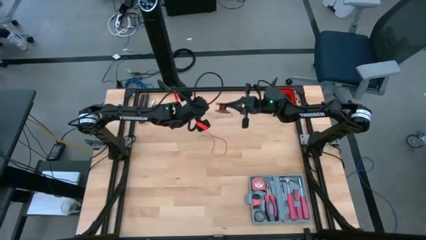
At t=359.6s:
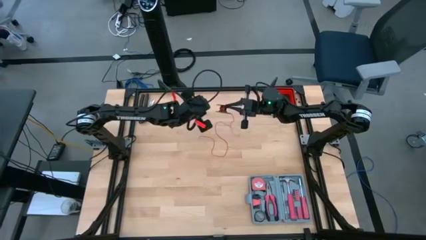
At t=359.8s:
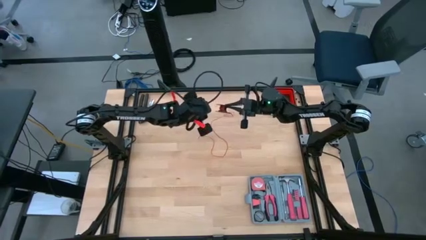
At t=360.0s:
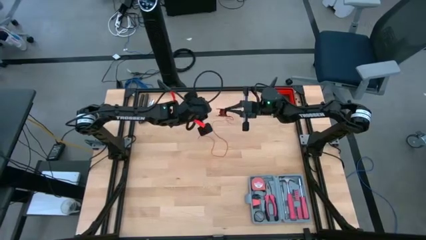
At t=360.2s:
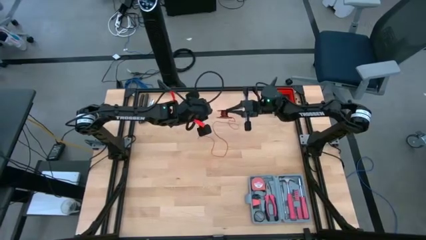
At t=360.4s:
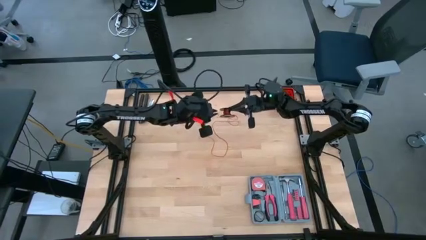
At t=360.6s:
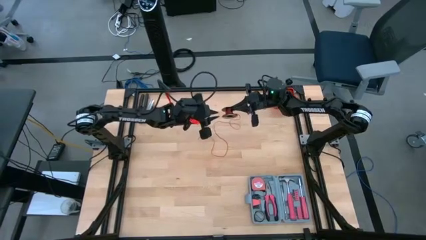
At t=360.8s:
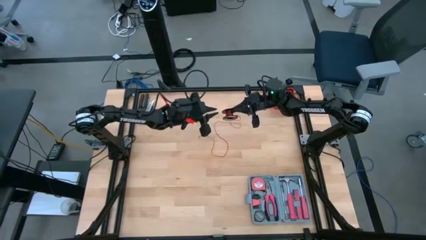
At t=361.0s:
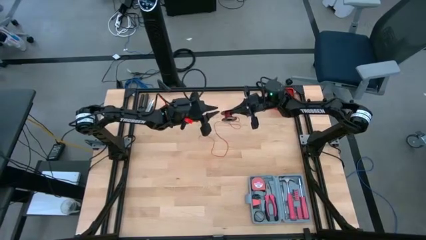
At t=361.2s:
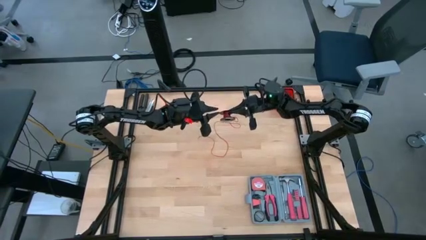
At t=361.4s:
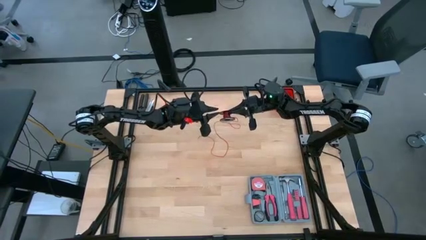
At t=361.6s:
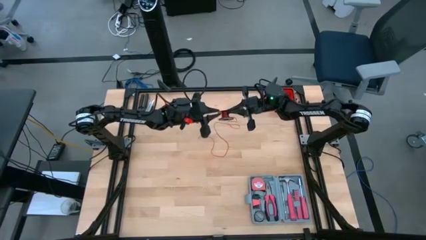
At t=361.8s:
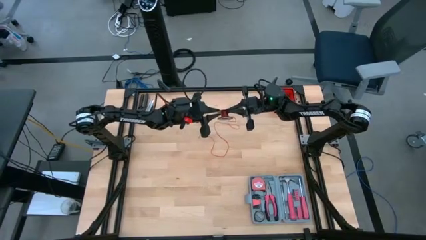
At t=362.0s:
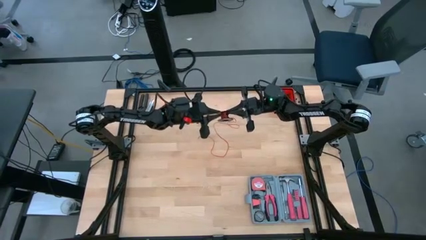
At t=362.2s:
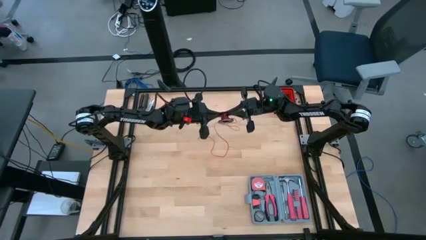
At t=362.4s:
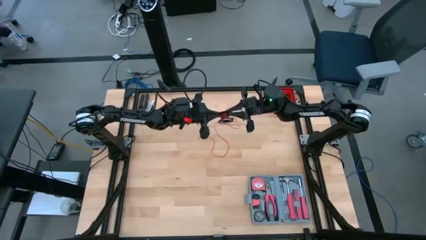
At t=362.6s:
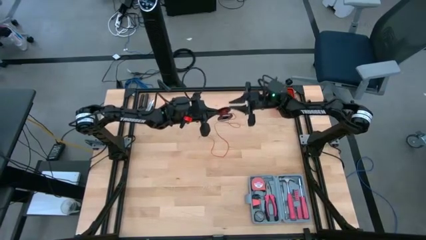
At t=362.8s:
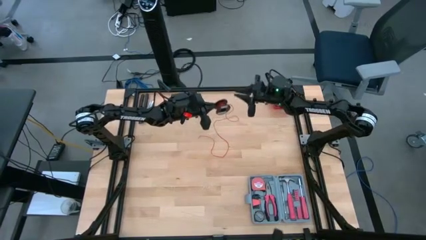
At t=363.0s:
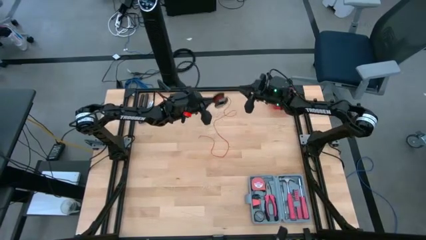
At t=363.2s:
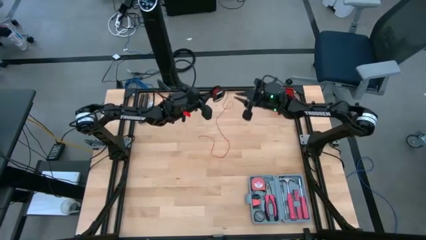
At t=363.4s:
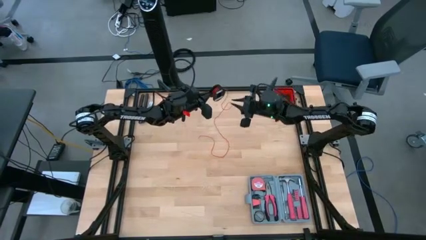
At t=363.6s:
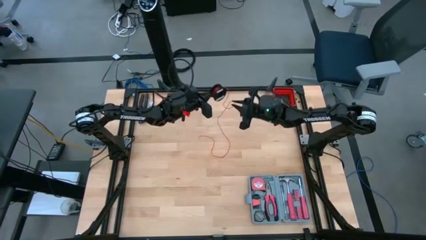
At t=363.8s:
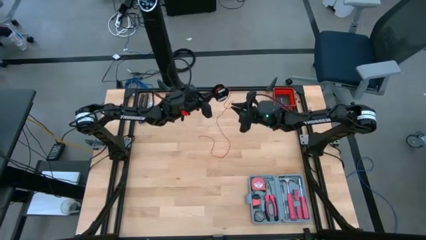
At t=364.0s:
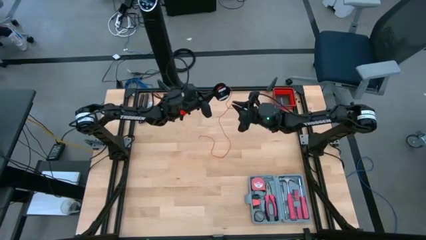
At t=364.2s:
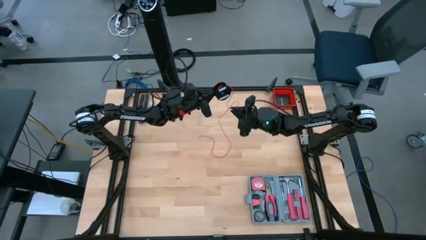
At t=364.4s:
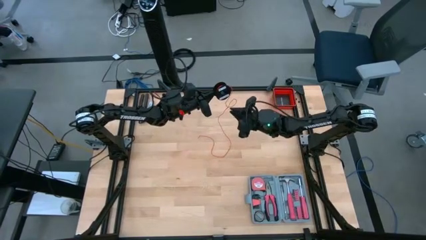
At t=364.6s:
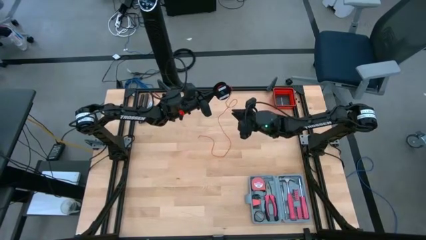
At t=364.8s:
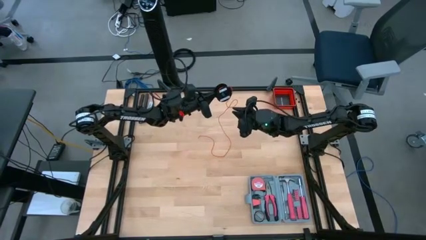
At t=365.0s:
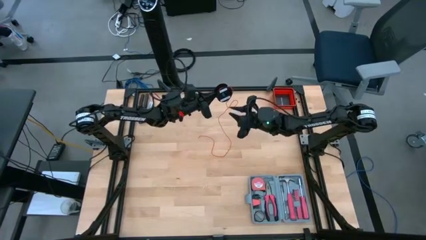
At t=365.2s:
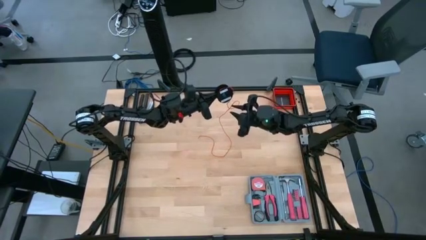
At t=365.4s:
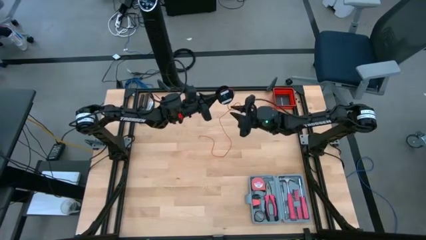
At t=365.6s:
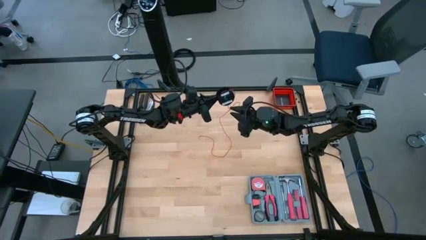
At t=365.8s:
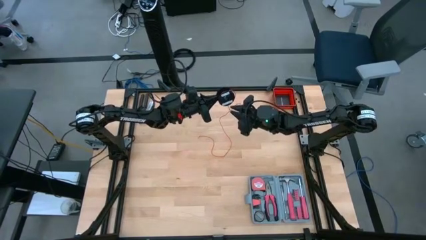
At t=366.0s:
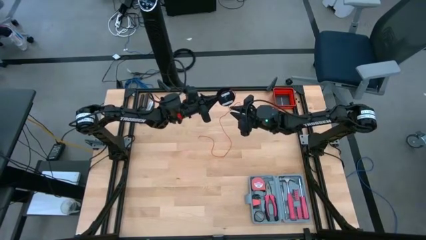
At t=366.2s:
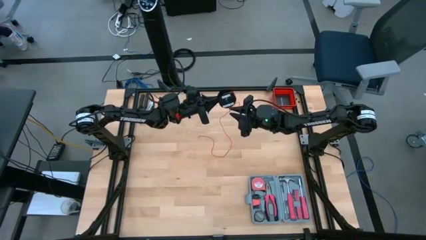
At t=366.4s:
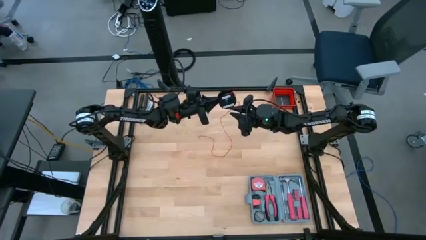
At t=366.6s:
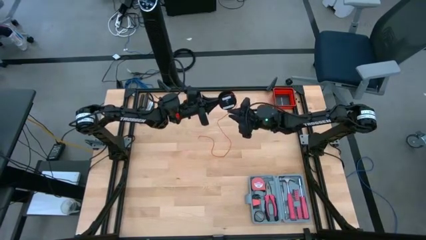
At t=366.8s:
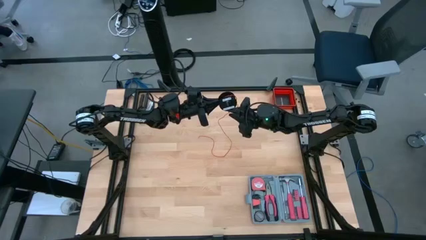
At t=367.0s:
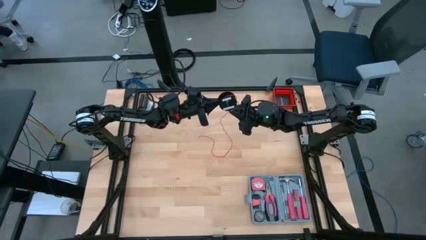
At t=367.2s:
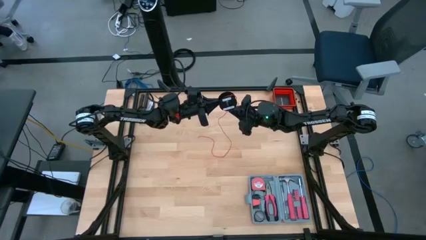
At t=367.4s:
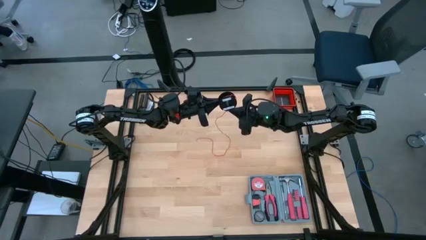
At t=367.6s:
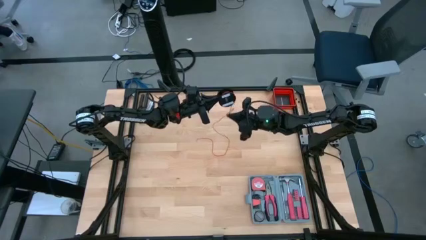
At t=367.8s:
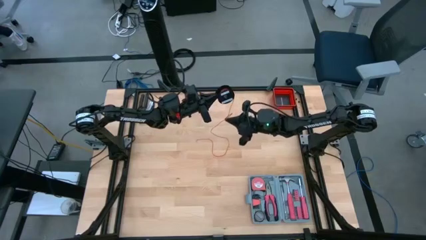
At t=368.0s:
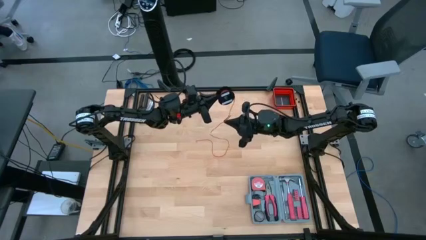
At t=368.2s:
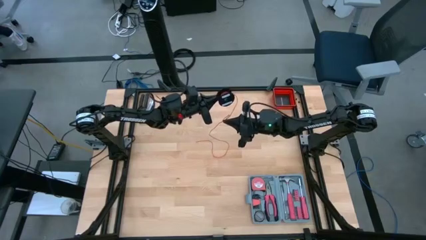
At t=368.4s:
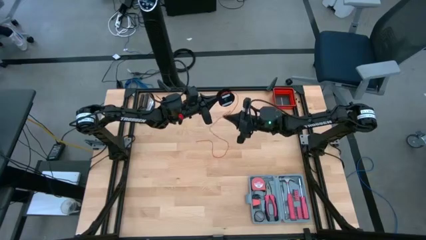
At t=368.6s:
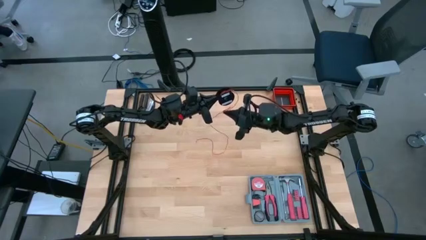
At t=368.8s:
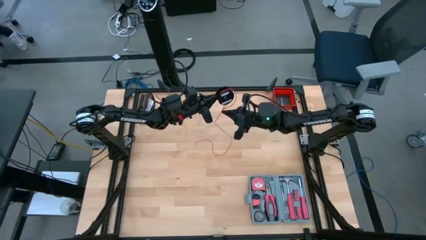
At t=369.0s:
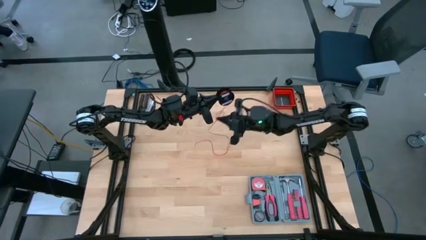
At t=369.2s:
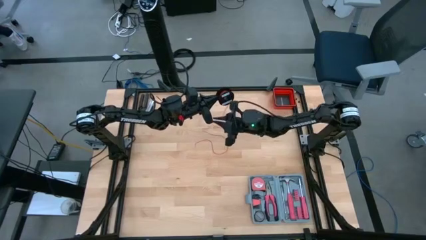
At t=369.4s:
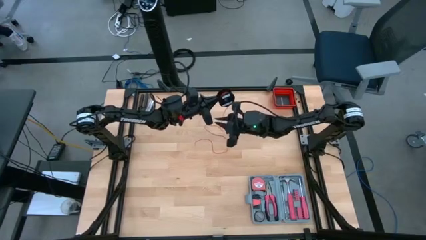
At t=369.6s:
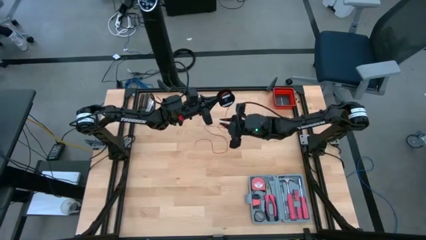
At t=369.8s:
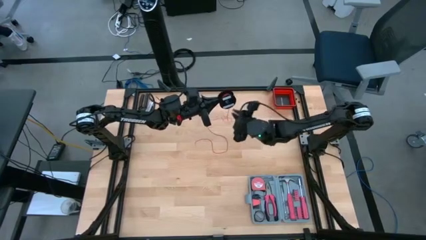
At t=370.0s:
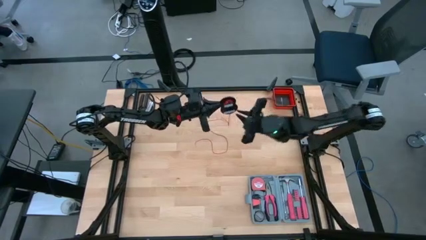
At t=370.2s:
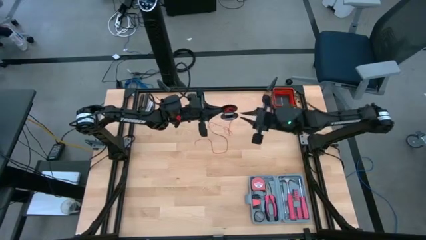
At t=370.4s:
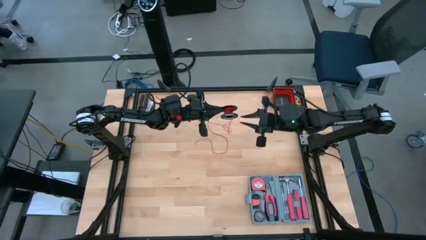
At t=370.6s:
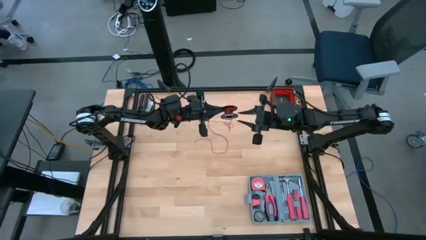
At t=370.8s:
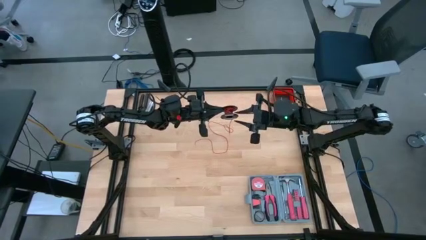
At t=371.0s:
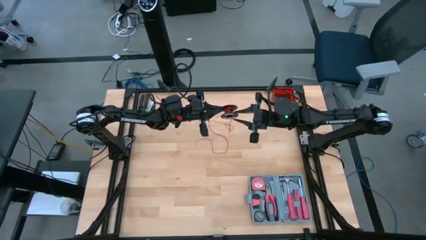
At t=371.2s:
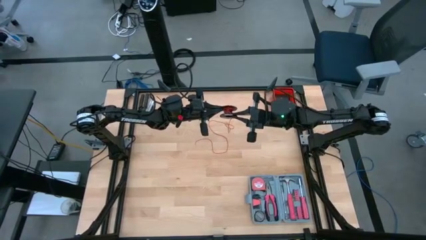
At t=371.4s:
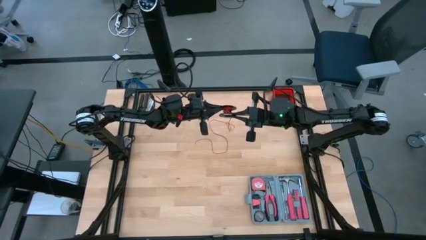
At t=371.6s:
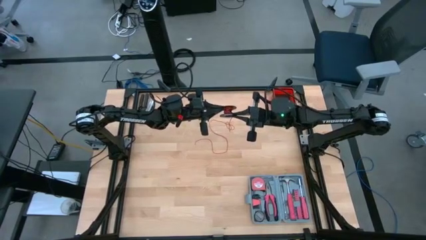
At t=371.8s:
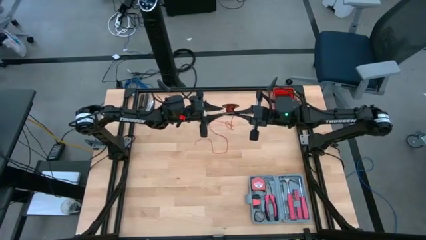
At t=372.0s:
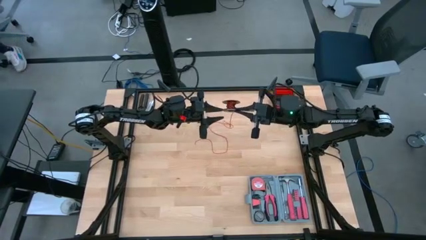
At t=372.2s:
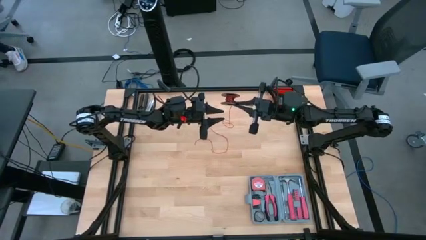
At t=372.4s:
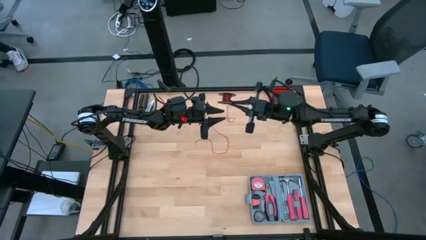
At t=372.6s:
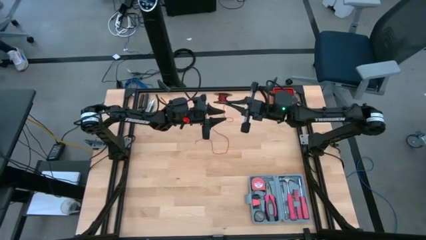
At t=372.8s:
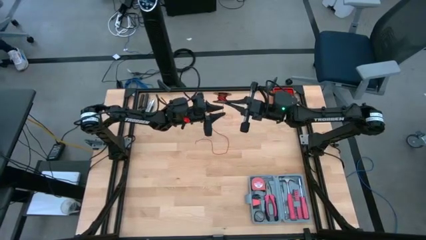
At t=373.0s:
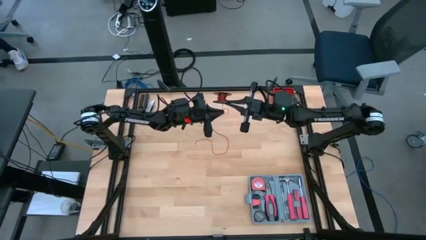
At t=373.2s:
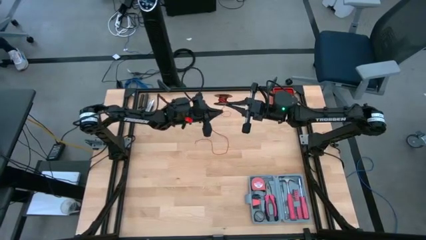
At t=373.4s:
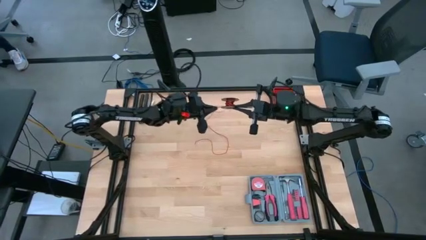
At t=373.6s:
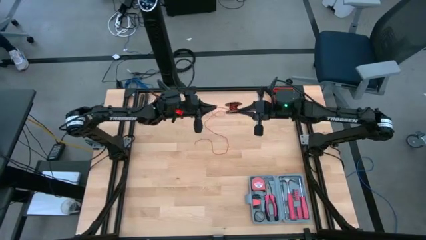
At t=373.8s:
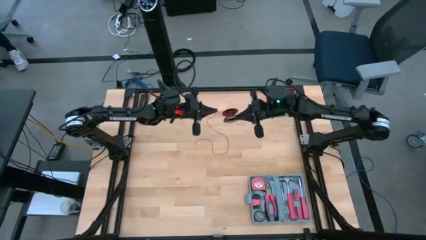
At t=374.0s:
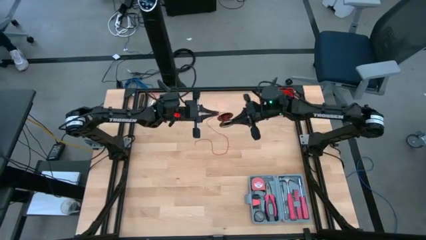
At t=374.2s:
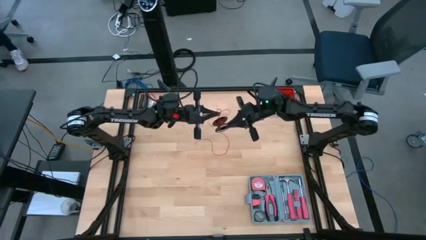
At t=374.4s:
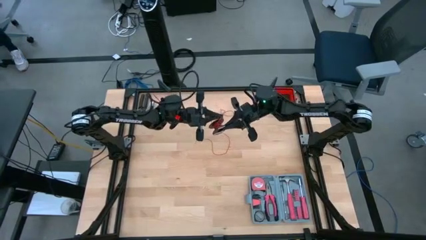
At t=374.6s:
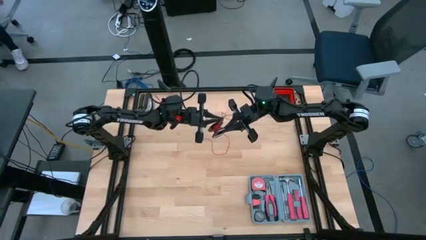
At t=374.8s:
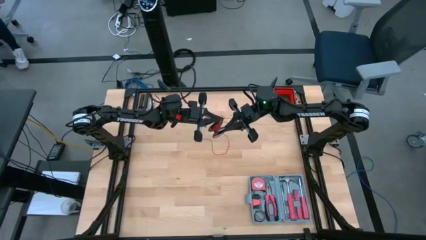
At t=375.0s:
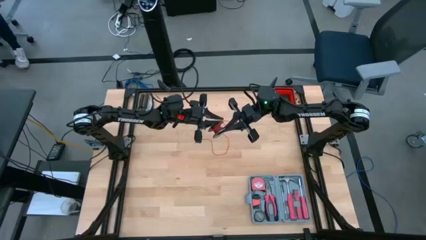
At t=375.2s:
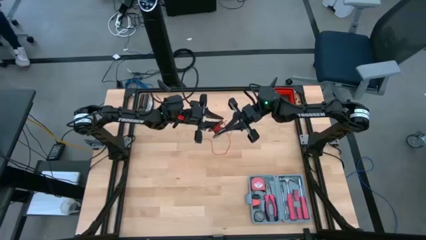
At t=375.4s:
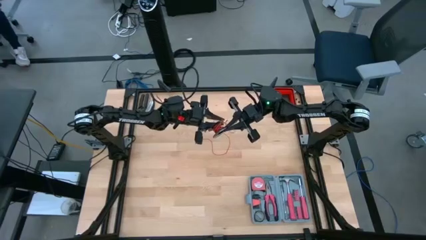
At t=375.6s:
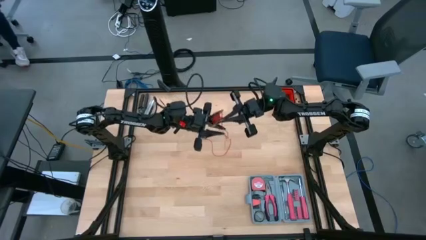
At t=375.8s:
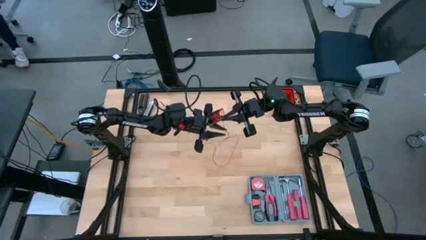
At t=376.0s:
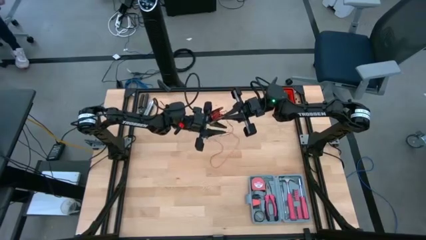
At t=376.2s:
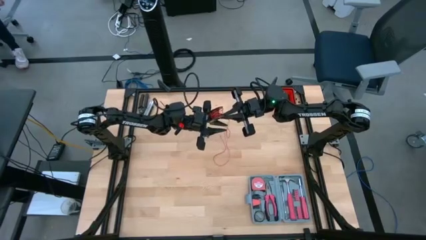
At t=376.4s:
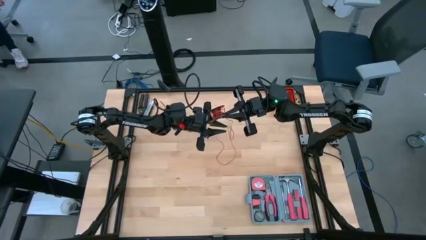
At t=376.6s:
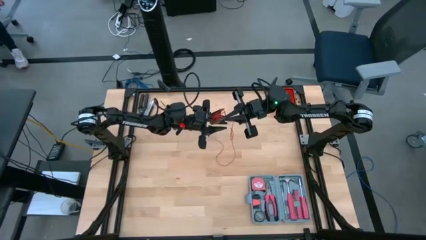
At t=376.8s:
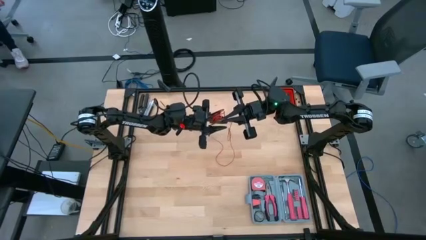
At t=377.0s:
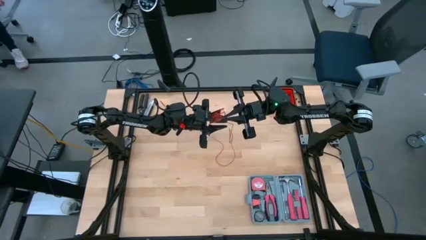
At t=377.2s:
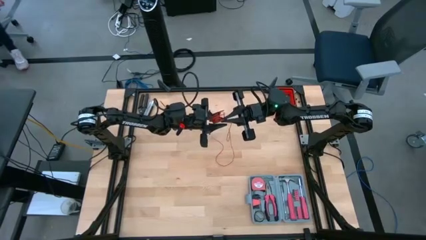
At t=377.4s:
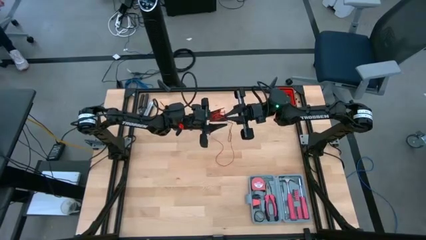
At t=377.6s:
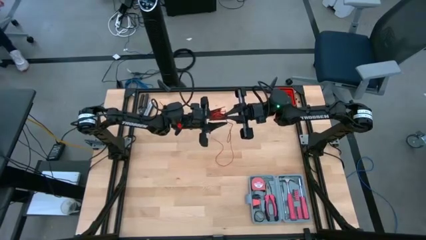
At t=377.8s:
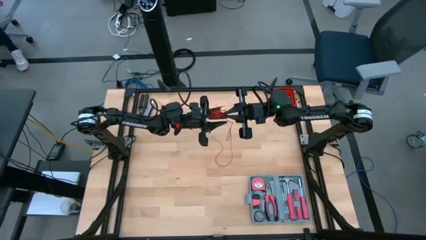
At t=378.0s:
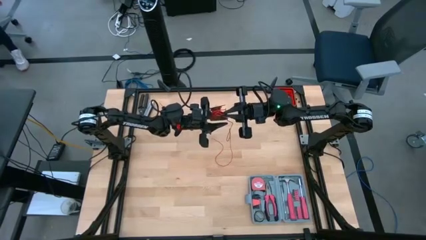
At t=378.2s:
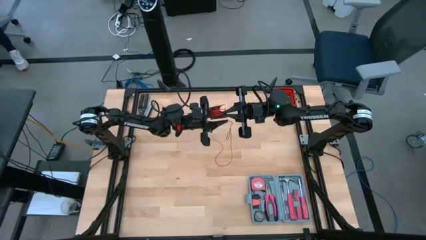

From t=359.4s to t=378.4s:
Task: Coil cords
Coil the wire
